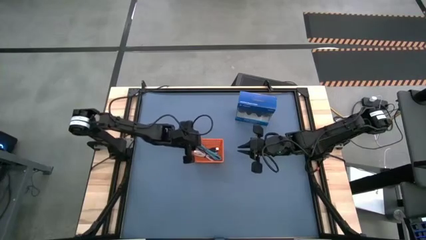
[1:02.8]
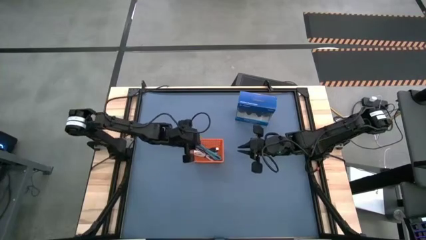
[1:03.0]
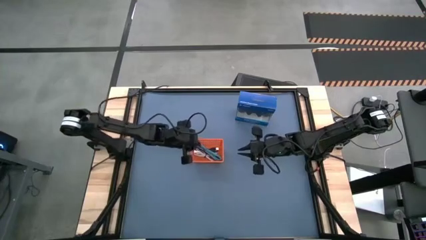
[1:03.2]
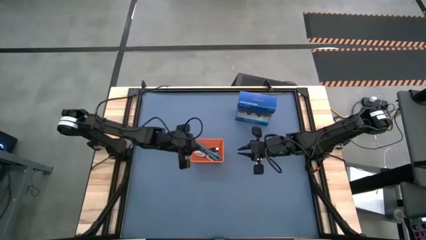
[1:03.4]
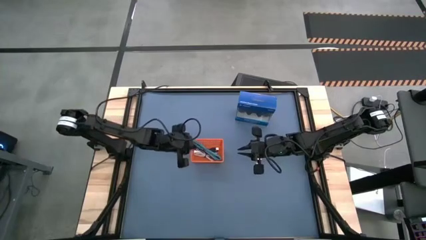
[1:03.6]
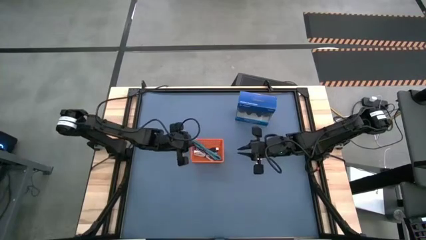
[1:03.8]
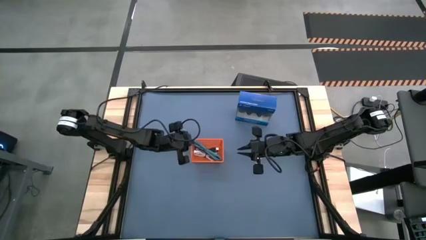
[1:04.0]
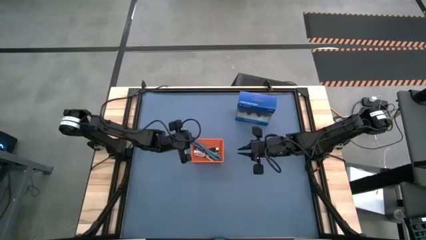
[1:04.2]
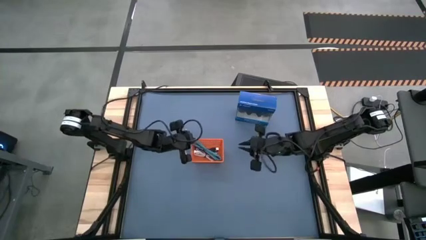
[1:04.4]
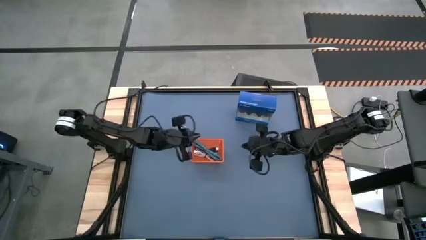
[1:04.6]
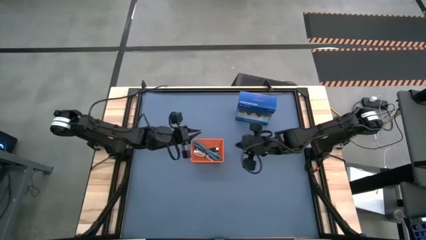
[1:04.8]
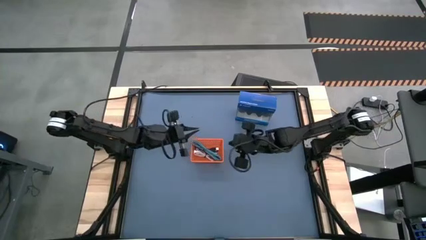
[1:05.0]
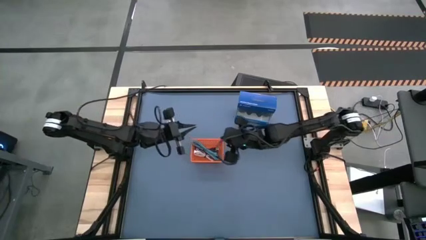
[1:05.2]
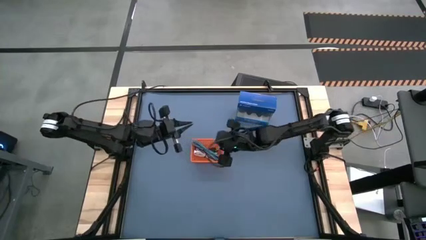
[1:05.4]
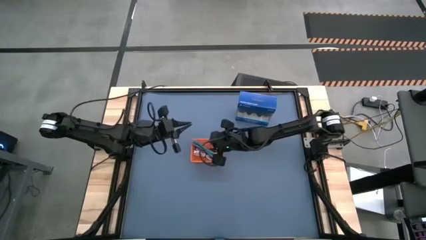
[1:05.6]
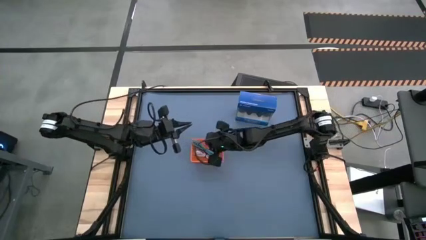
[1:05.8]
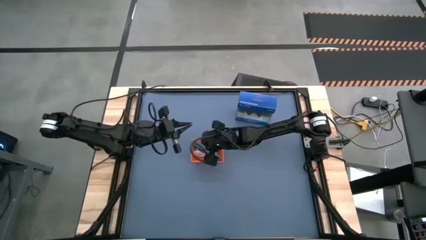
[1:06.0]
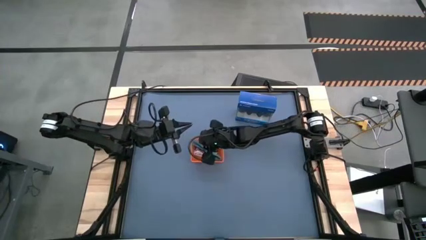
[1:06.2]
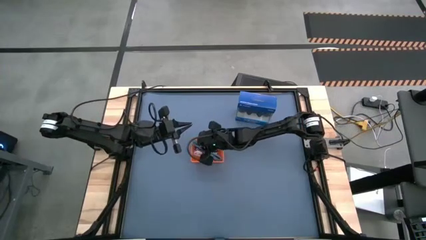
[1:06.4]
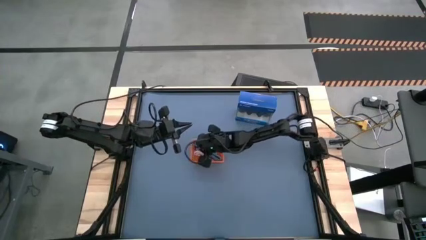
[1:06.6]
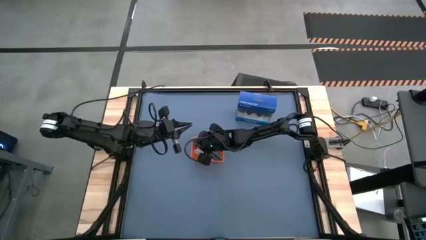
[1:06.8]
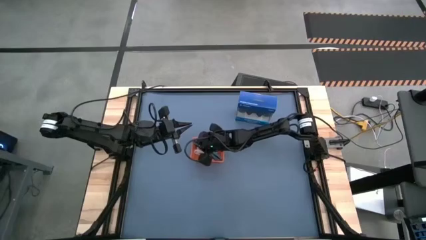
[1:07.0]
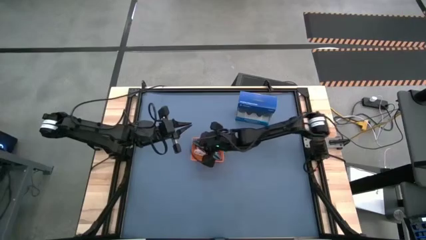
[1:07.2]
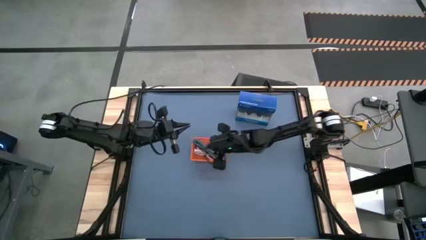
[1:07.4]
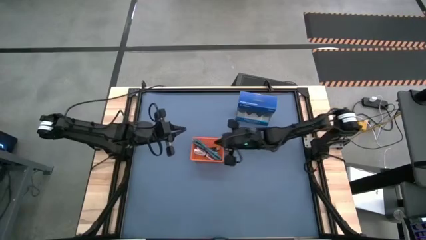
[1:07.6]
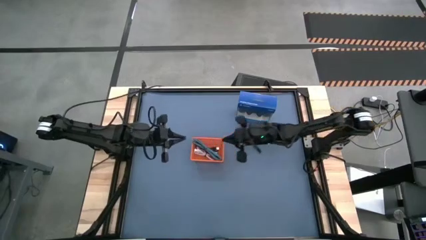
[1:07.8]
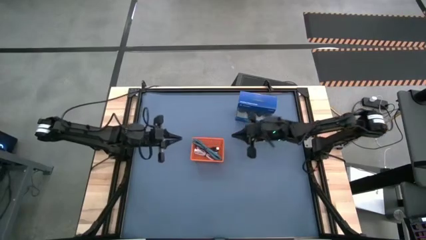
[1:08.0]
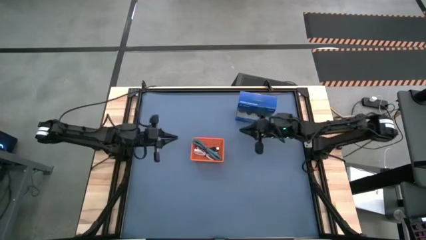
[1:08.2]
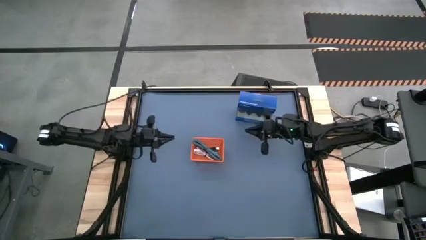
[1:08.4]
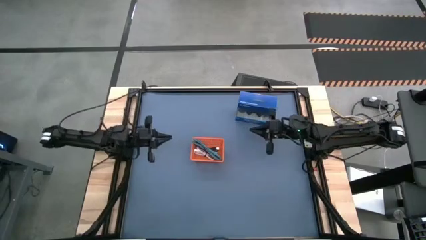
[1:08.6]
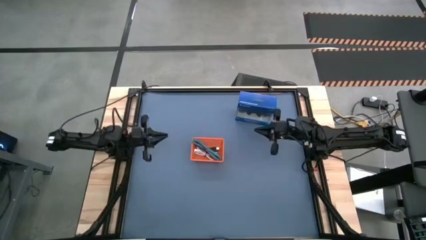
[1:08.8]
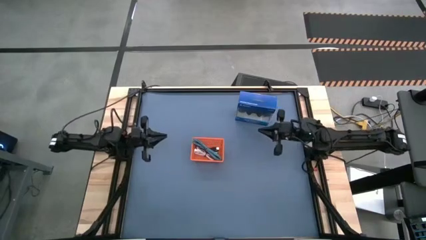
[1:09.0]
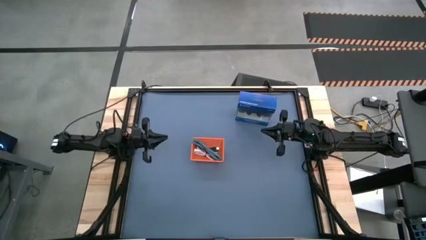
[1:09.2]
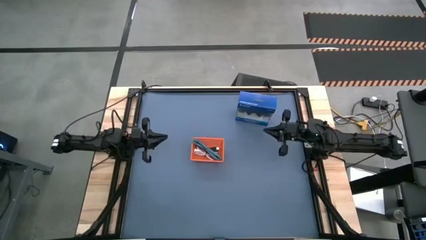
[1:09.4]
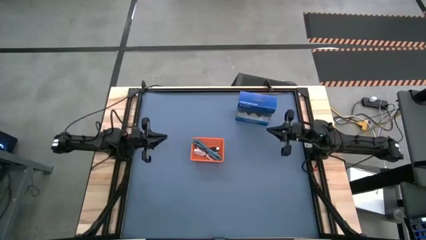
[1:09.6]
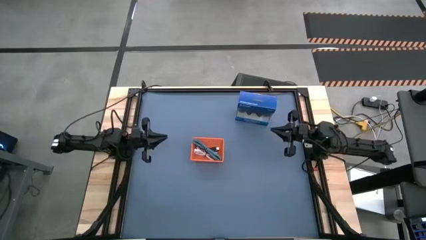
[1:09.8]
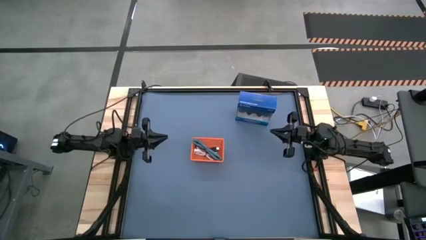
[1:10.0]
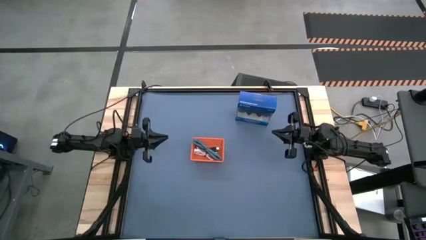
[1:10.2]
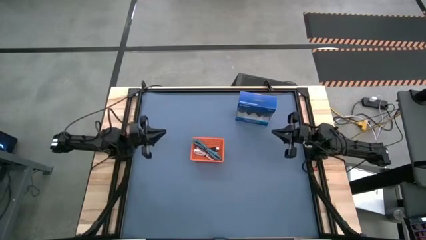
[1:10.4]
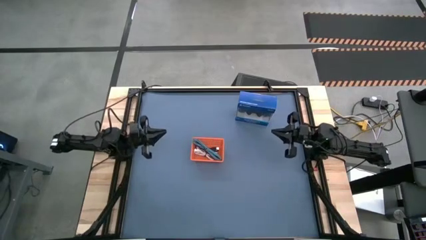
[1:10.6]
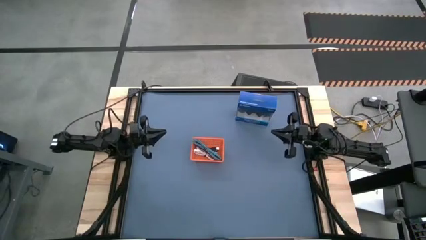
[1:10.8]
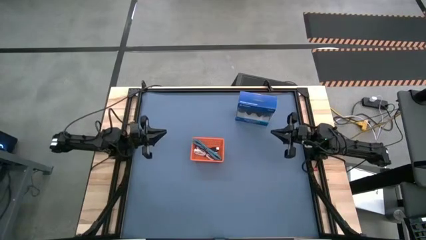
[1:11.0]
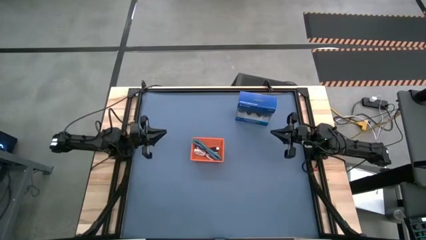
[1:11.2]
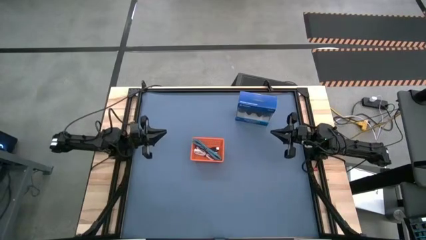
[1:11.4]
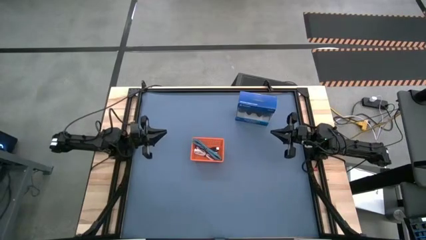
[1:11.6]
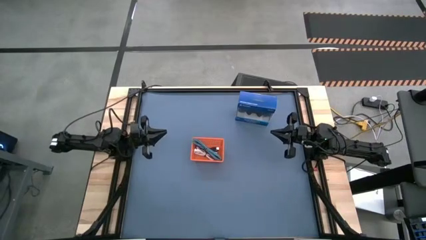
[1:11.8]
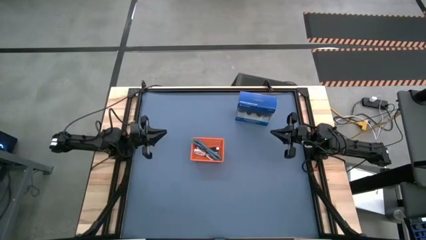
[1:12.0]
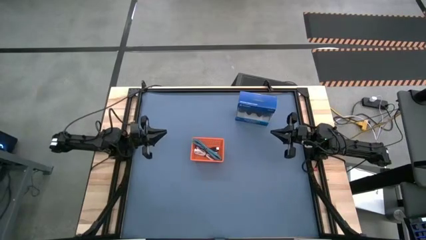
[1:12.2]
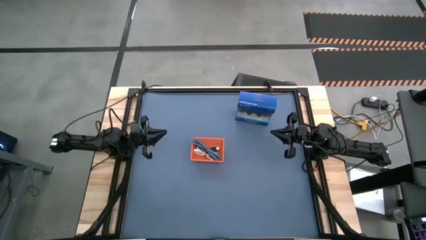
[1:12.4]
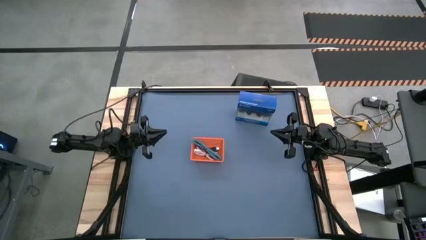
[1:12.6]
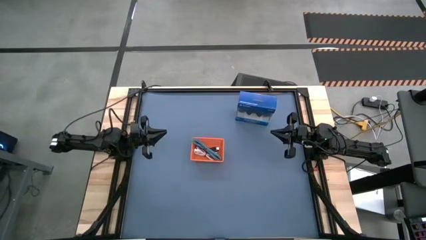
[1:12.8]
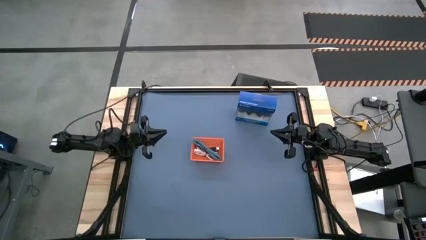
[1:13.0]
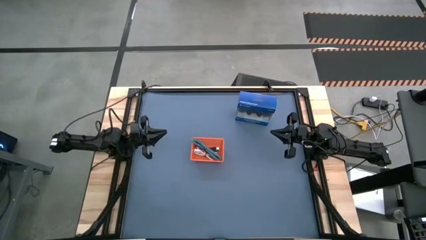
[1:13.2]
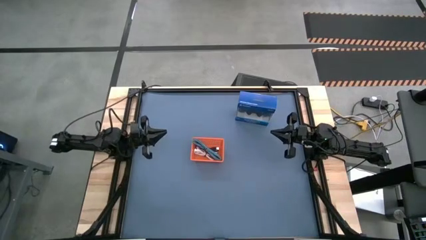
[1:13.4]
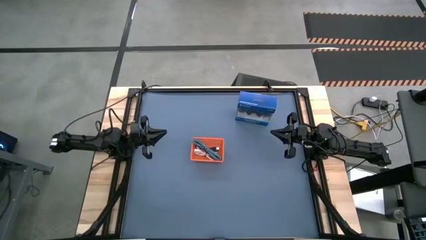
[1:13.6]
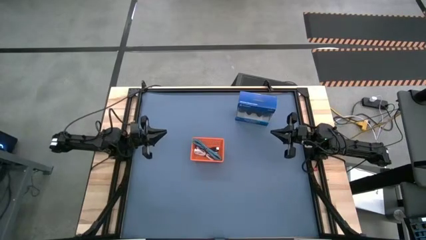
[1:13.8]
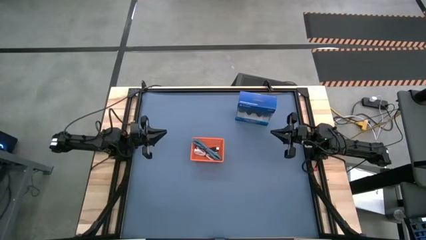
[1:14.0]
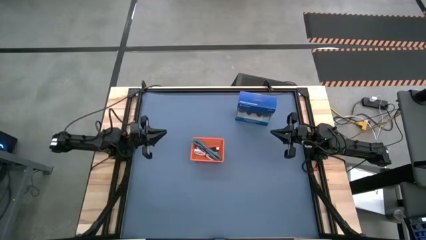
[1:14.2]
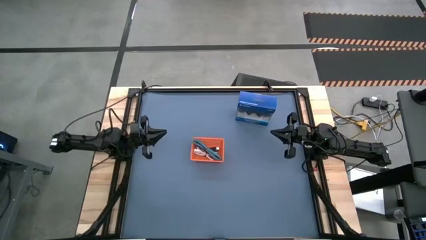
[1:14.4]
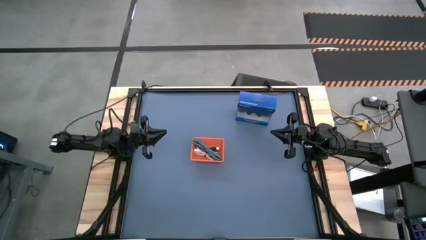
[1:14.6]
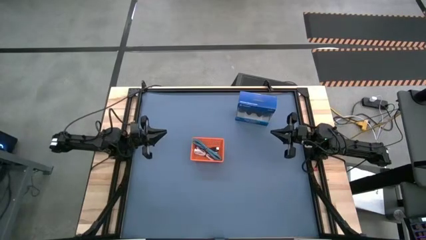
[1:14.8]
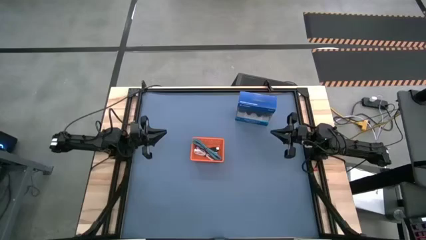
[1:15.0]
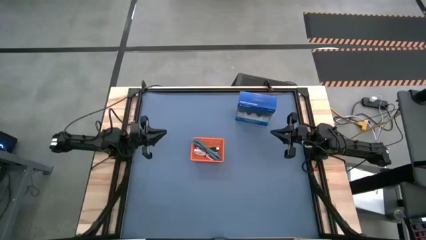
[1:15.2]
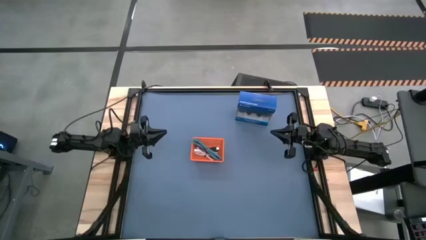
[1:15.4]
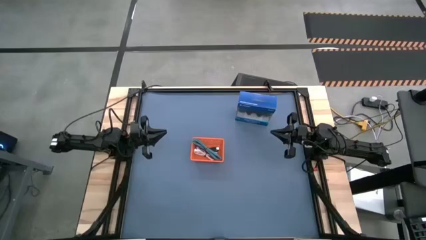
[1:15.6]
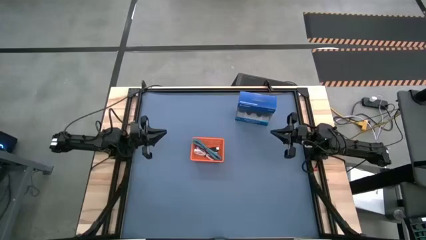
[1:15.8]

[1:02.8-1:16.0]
Task: Pick and place USB-C Cables
Return to Home Position

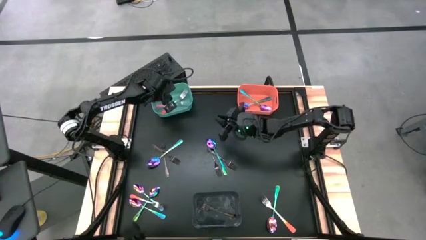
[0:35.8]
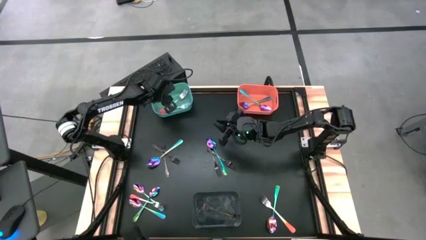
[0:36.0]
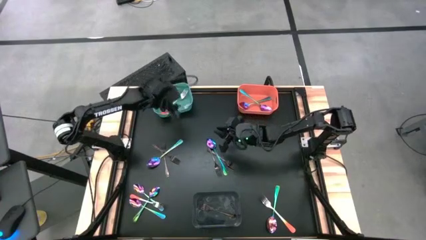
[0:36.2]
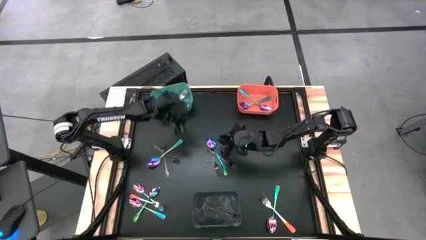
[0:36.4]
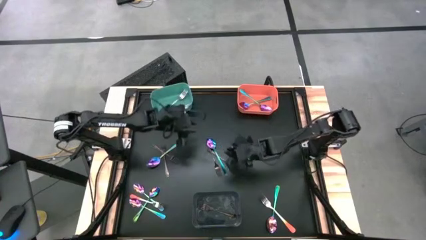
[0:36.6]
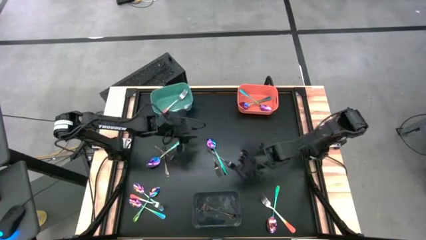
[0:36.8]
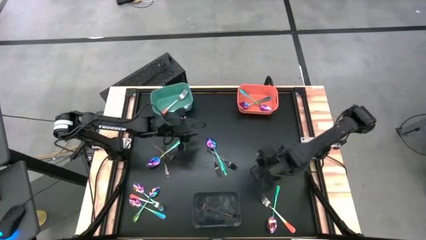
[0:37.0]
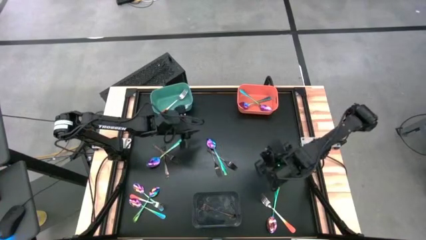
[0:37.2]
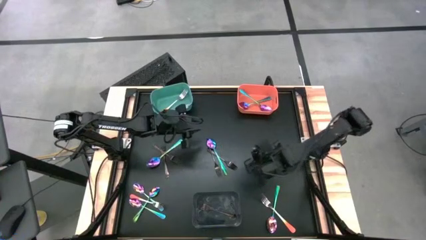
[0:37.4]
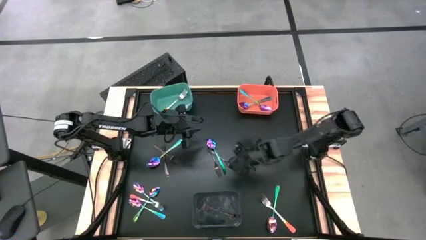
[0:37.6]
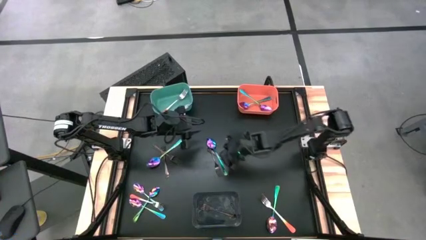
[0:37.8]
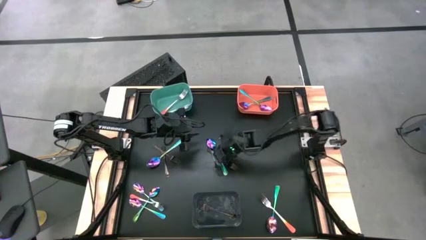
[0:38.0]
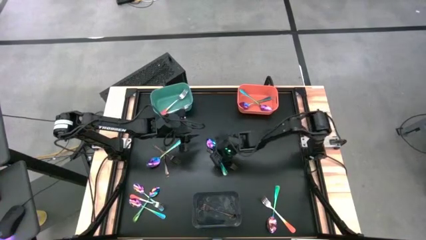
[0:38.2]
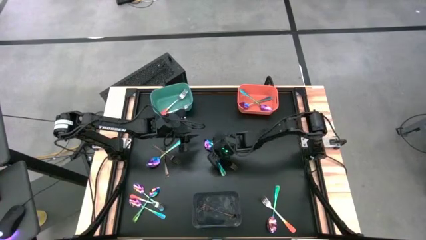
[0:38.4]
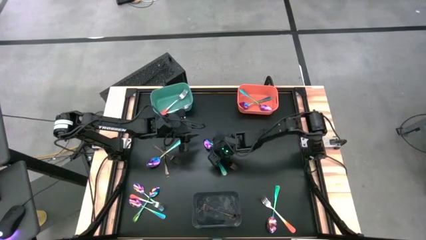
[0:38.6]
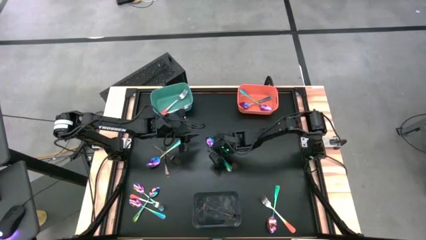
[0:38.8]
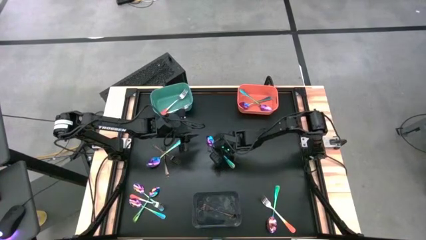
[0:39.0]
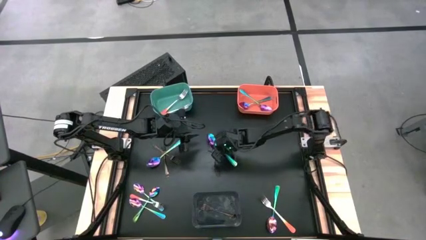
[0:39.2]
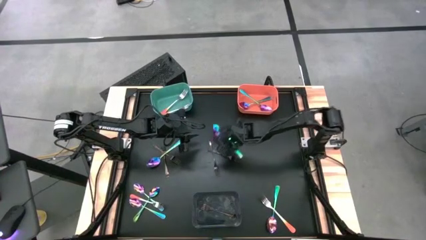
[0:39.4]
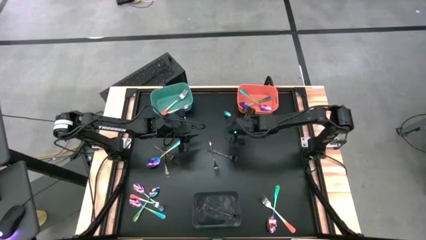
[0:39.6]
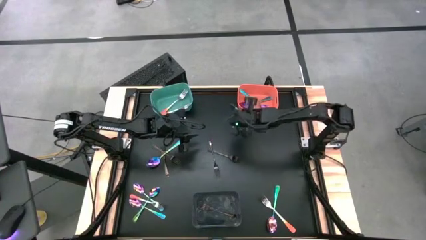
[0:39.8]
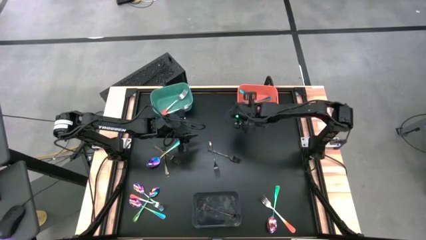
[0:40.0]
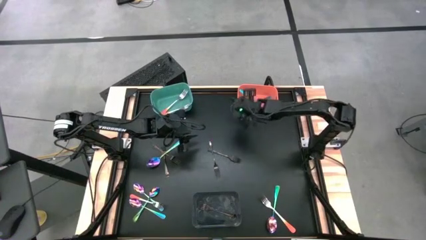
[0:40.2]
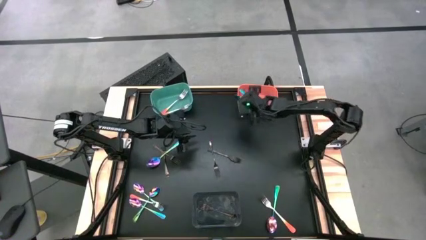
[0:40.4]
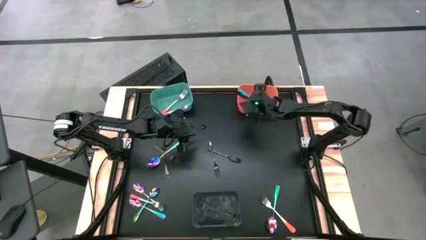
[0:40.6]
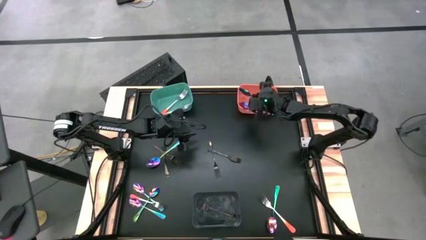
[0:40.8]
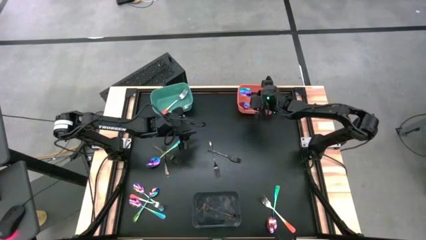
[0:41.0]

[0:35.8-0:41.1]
Task: Sort silverware by color (type)
Put the blue spoon into the orange bin
